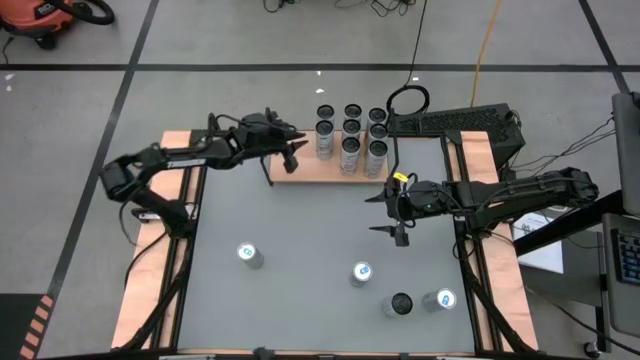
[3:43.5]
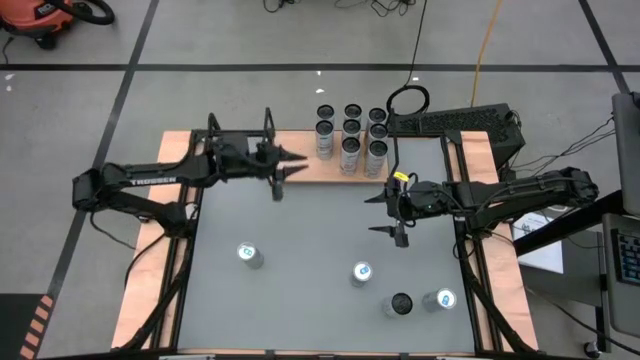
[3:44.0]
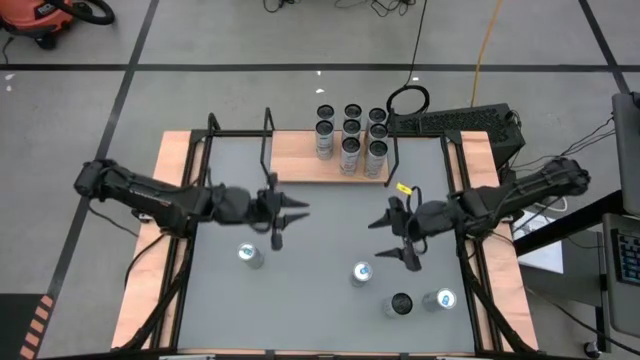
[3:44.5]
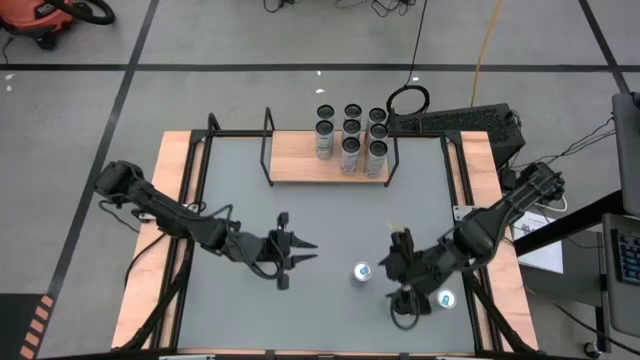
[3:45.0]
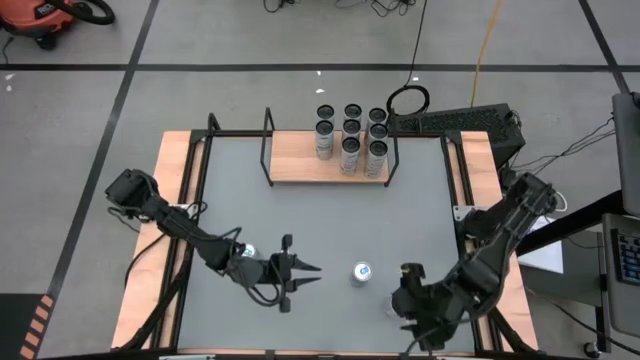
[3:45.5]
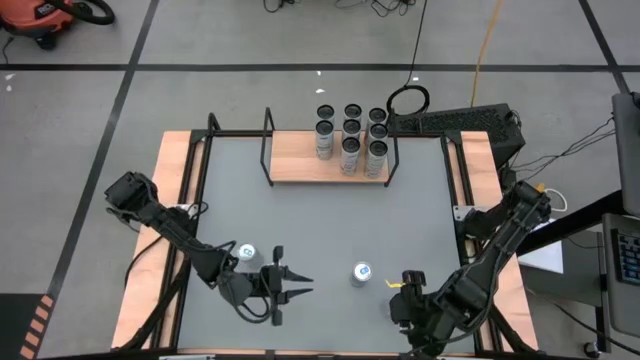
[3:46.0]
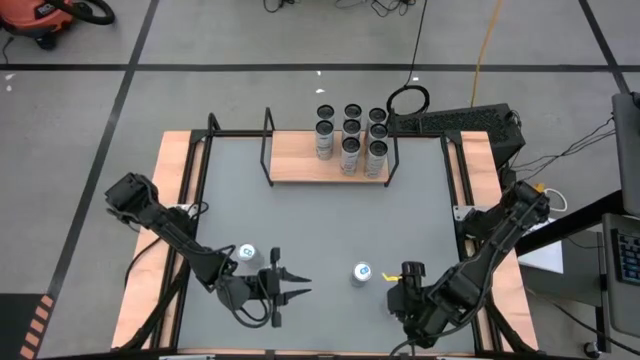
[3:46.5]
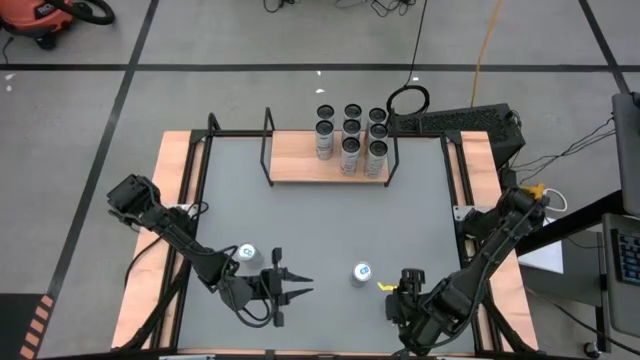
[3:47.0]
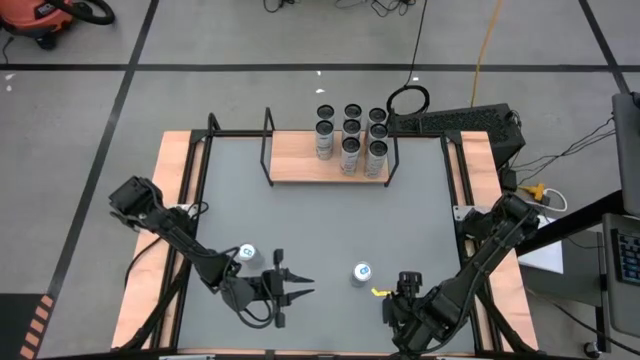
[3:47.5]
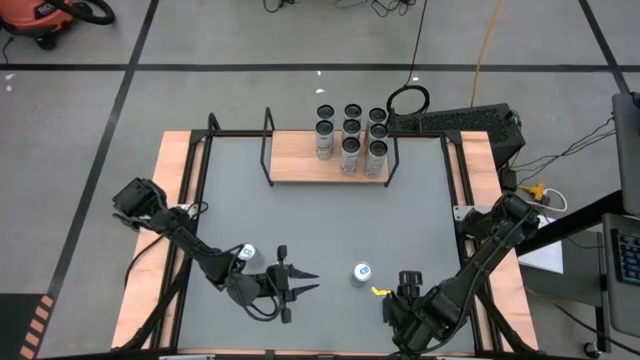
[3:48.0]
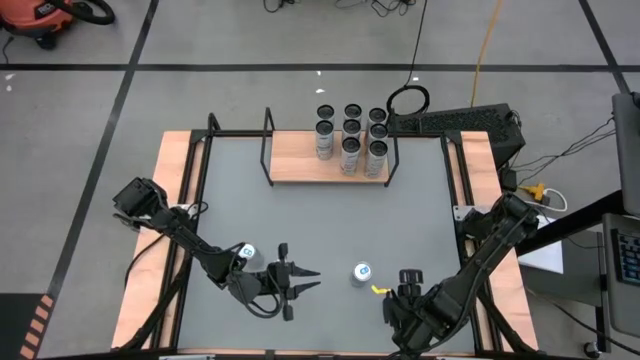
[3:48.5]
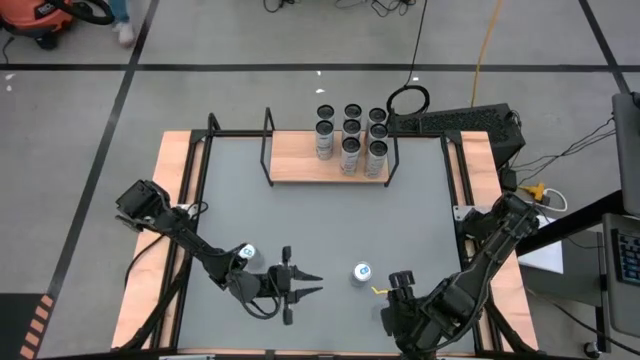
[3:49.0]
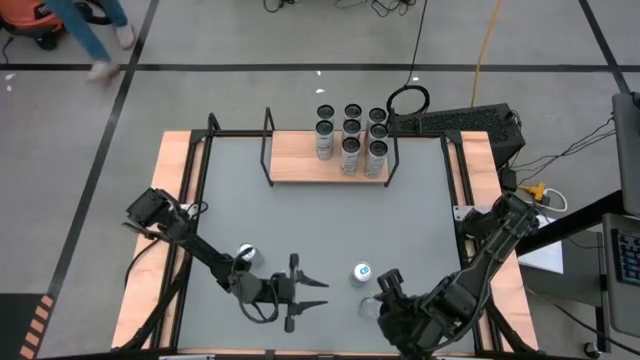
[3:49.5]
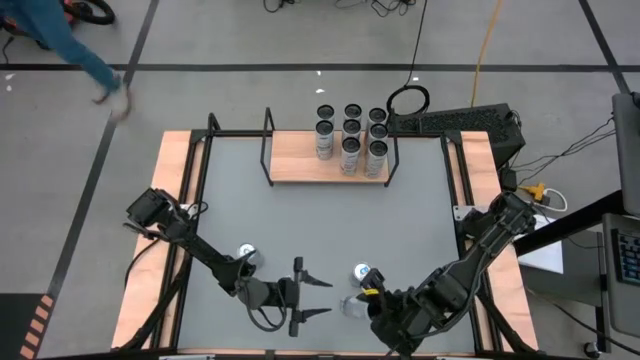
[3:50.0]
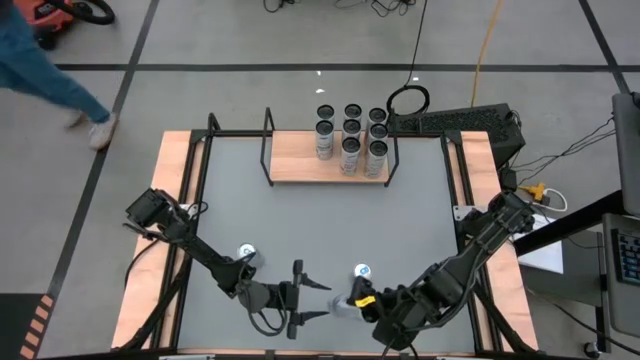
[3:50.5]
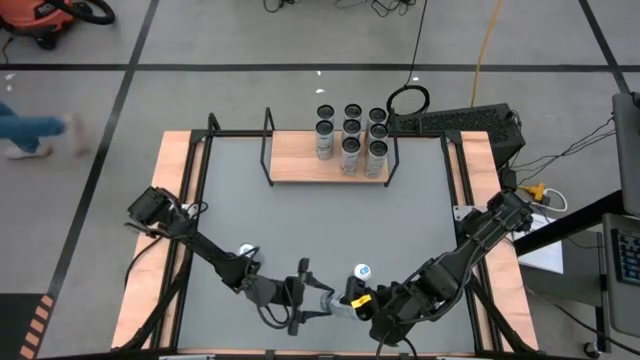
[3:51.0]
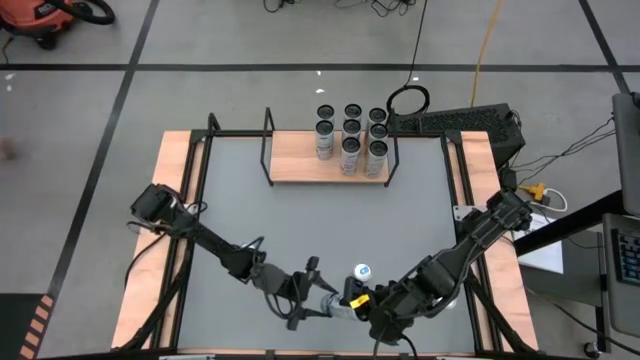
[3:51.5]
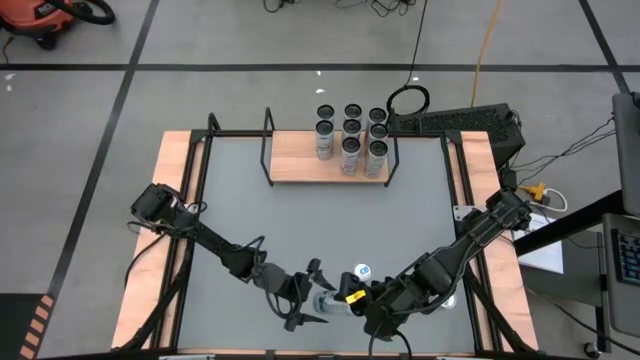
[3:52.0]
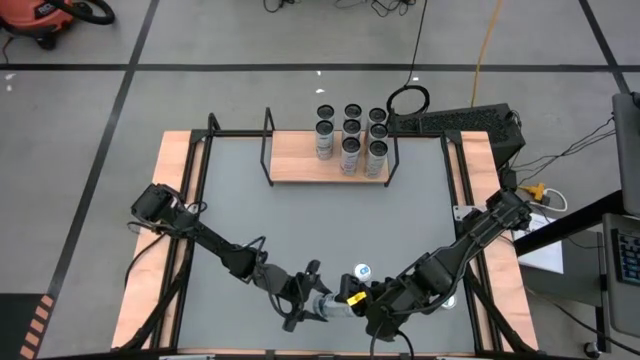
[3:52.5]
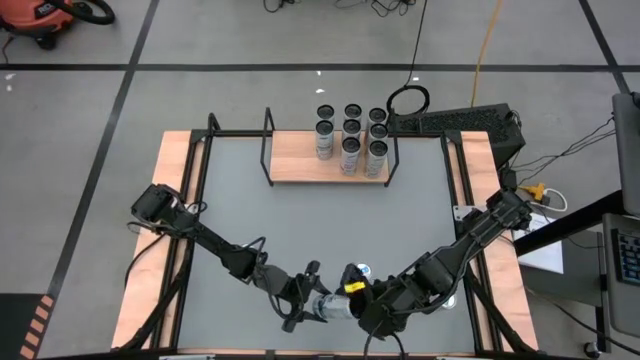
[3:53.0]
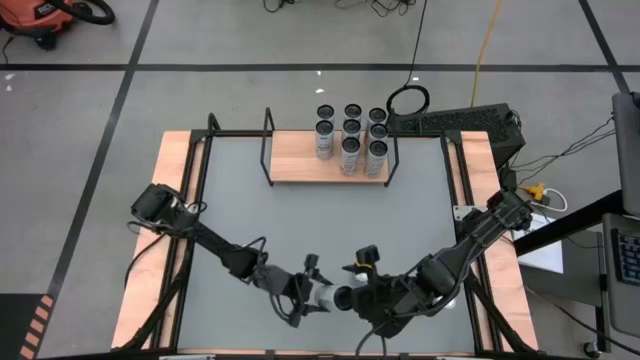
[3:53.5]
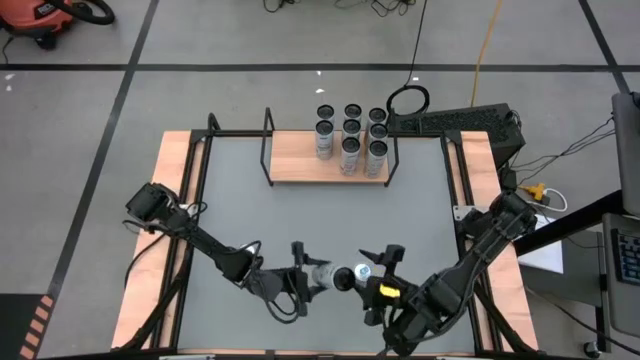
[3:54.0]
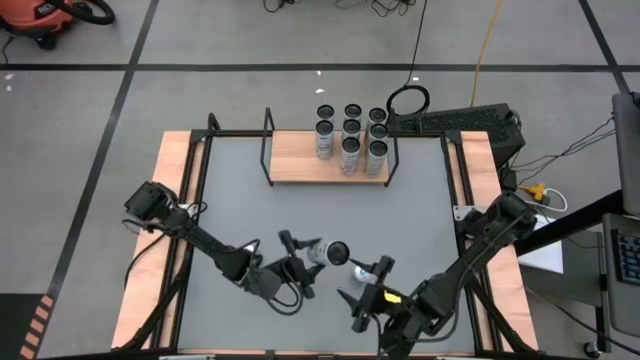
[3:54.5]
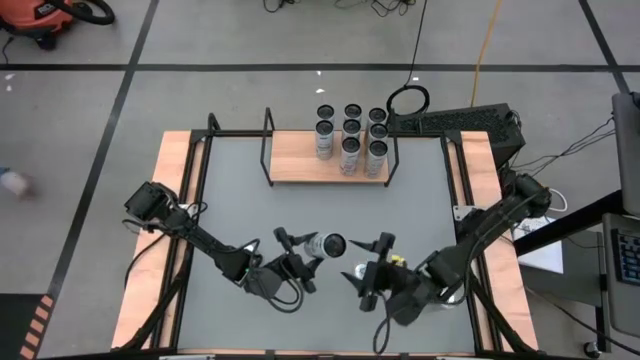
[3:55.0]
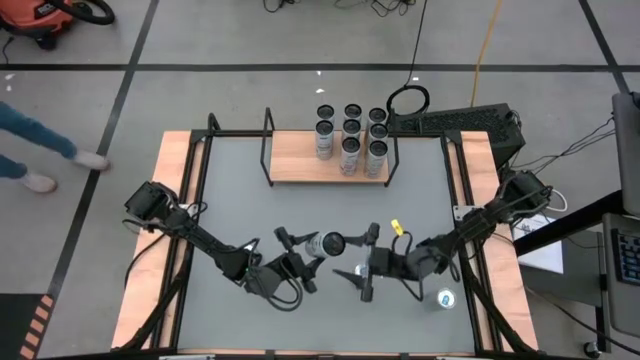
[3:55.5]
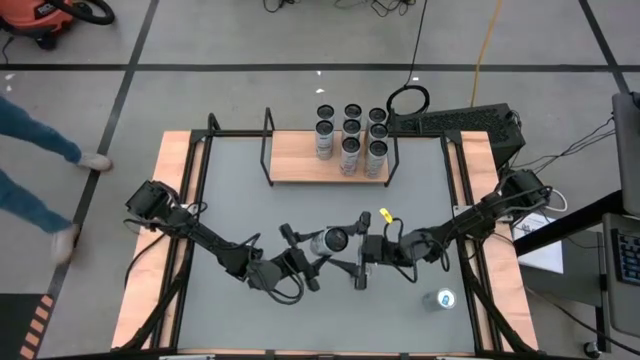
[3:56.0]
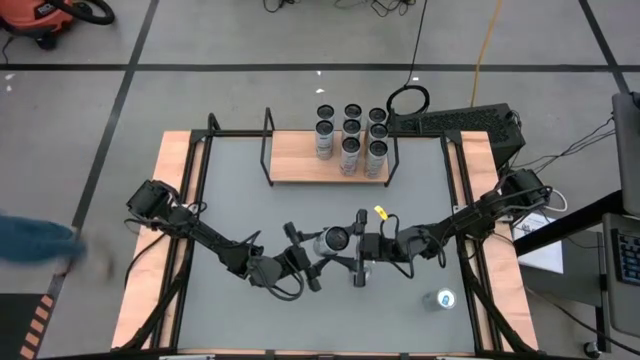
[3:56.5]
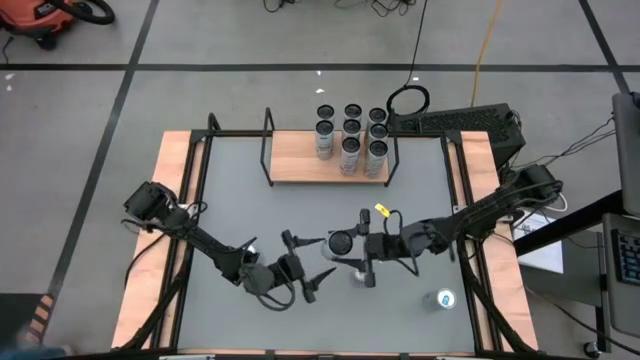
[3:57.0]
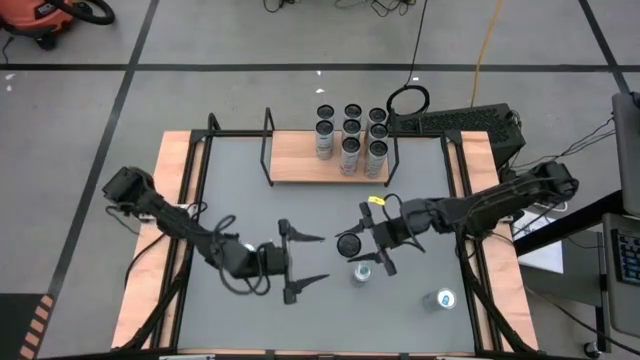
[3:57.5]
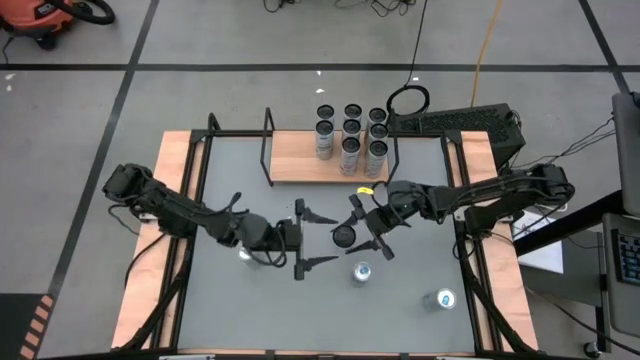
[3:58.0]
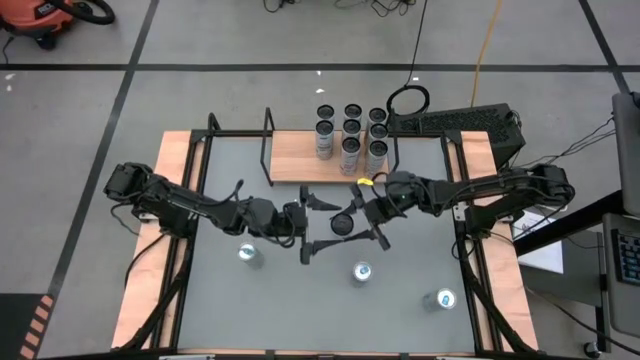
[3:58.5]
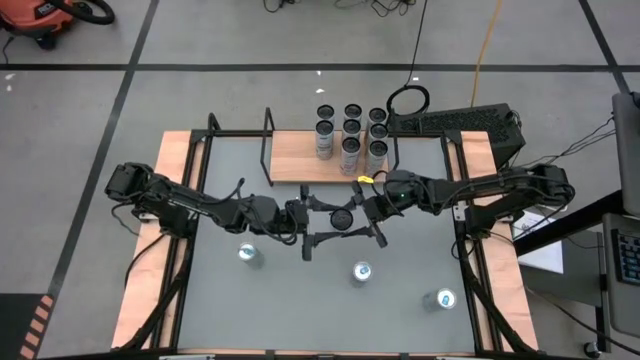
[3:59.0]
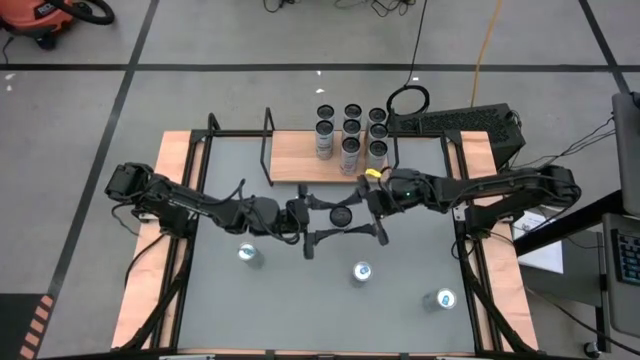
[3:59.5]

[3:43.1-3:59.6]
Task: Place canned beverage on shelf
Put the white blue soda can on the shelf aligned with the white blue soda cans

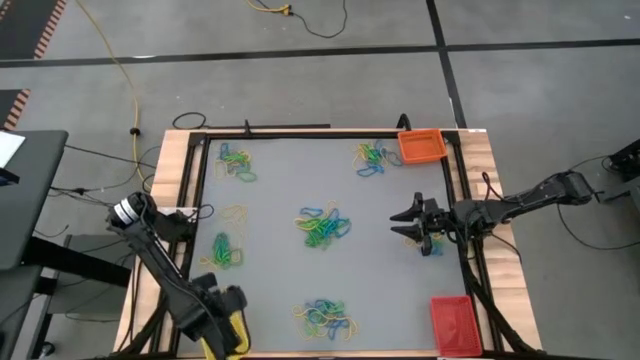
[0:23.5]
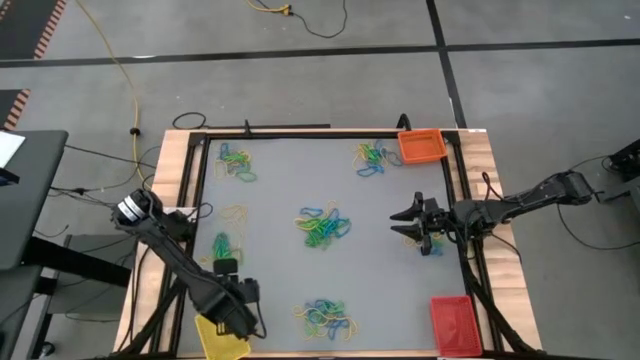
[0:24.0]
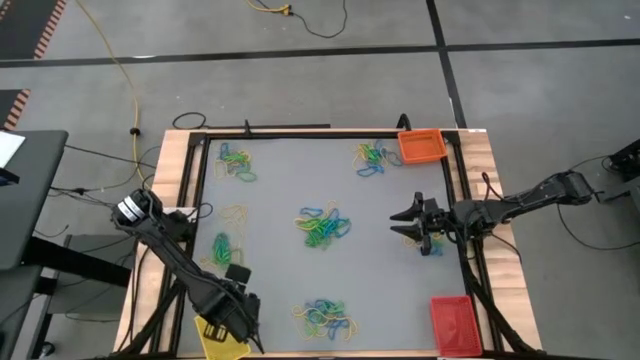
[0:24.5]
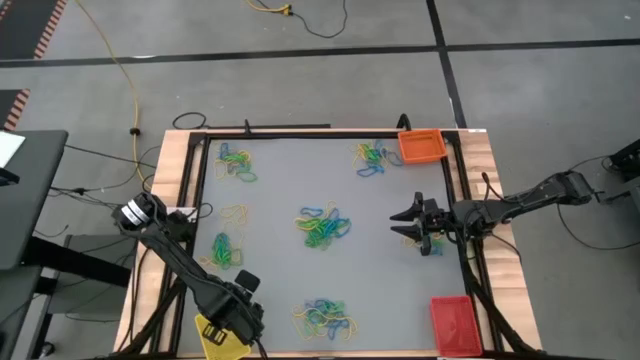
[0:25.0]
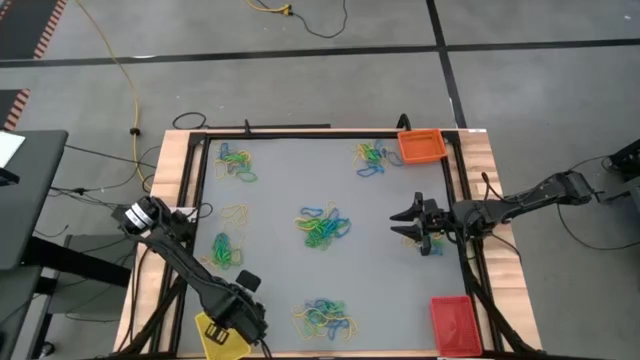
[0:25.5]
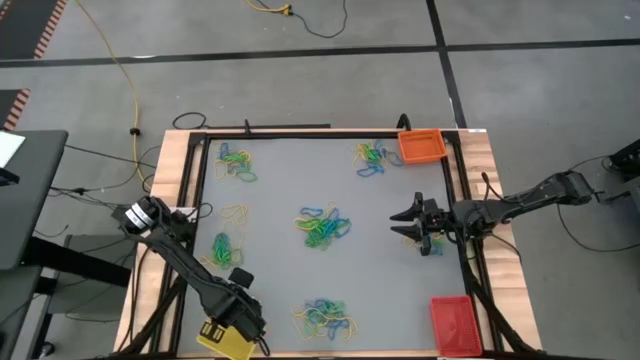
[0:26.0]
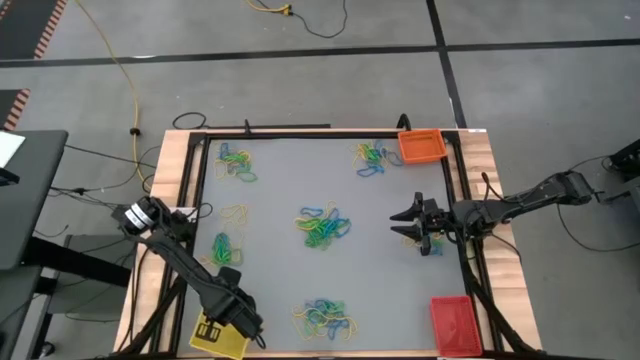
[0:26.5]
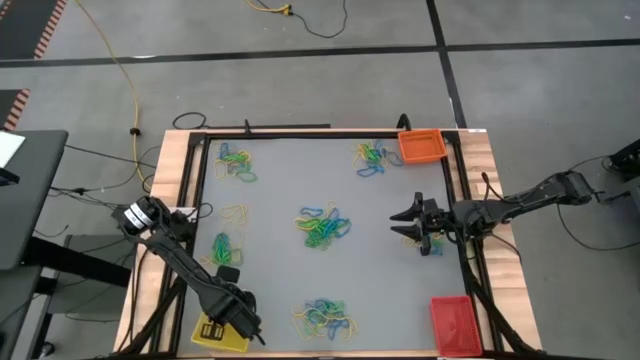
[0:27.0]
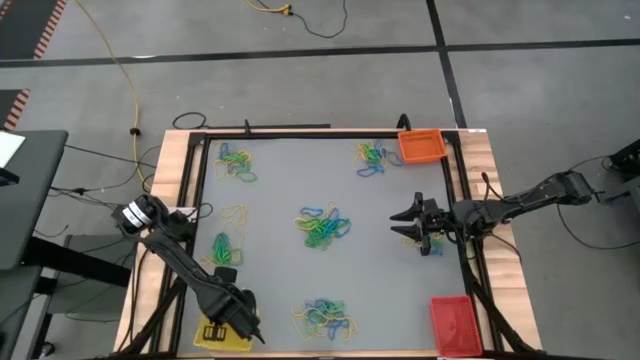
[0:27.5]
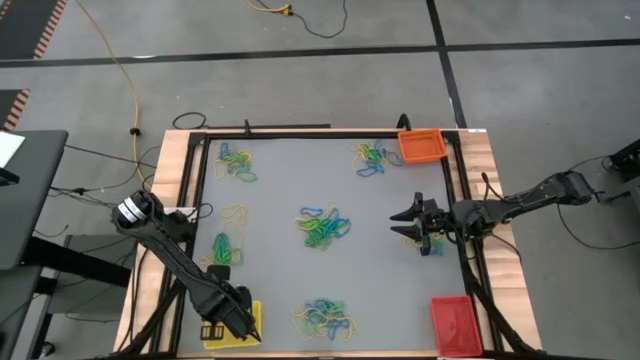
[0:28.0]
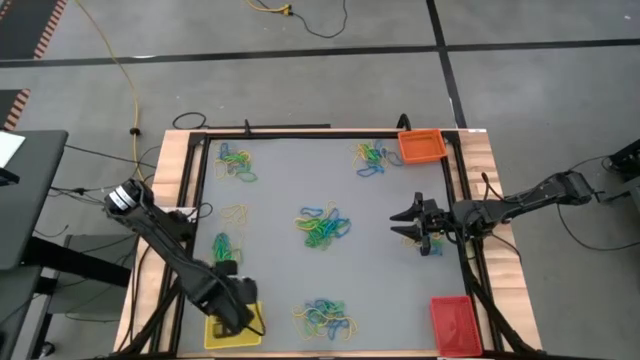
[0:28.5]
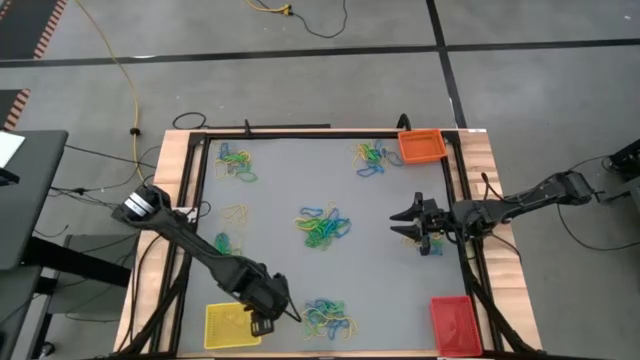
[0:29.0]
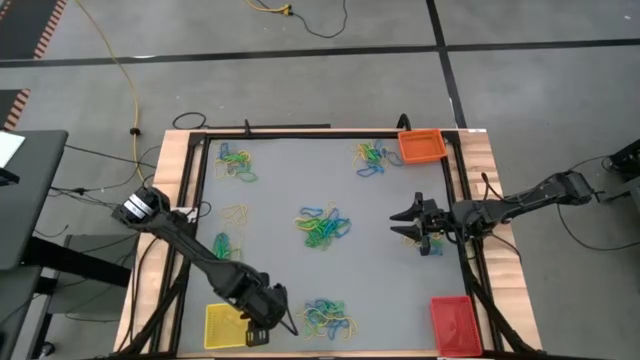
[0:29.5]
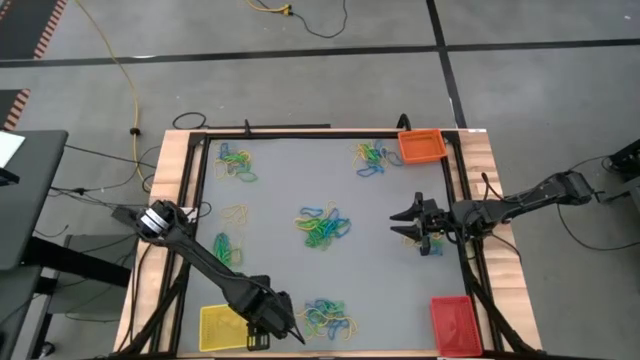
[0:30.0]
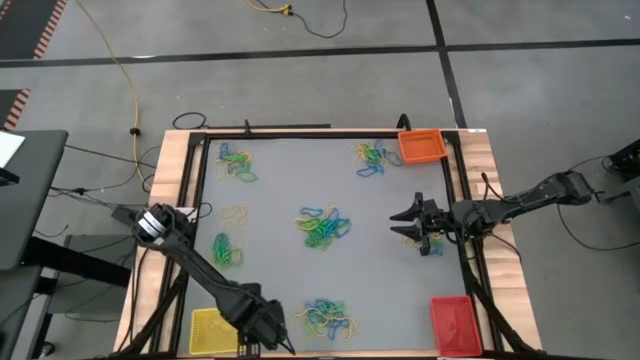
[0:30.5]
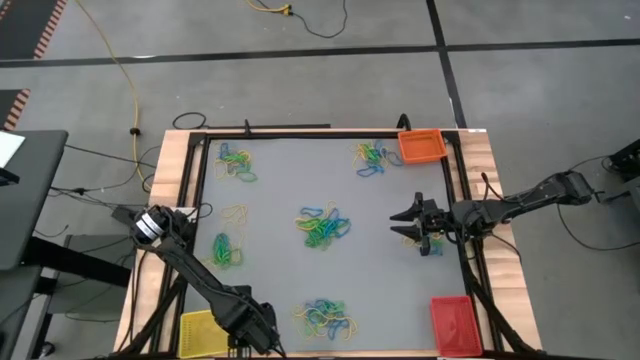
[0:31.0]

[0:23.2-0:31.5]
Task: Sort rubber bands into baskets
Adjust the yellow bin
